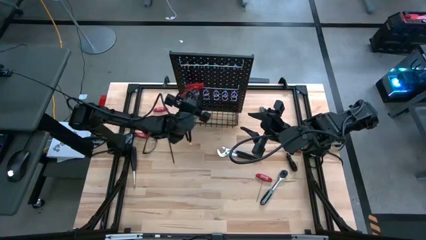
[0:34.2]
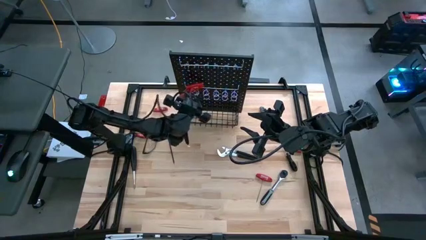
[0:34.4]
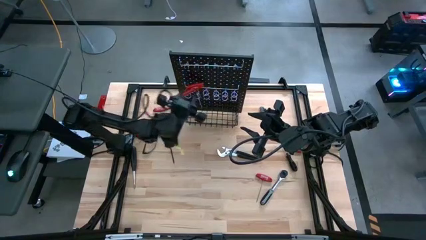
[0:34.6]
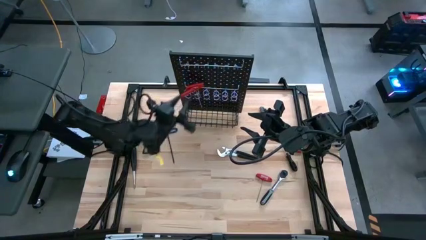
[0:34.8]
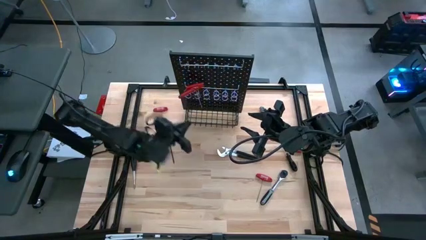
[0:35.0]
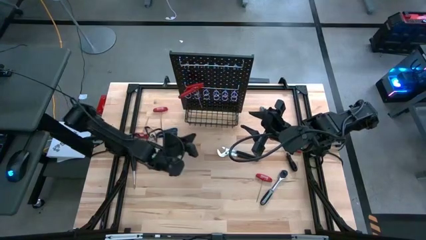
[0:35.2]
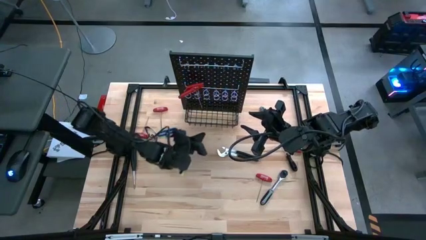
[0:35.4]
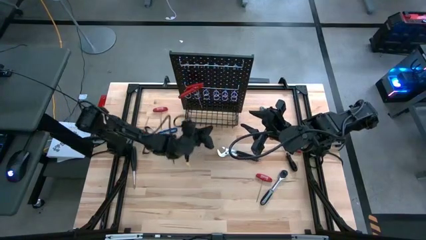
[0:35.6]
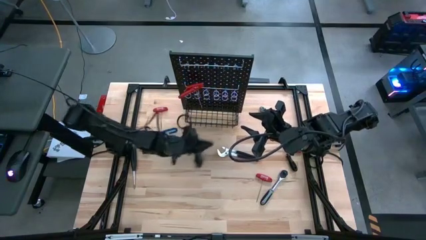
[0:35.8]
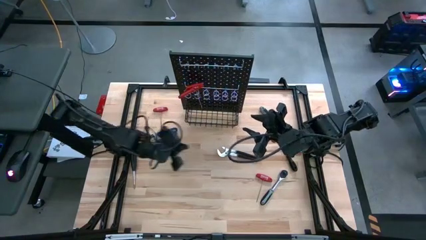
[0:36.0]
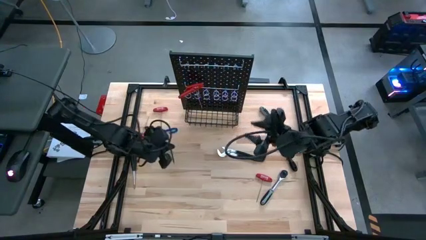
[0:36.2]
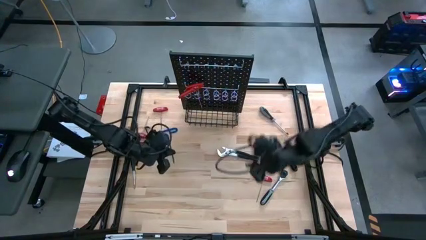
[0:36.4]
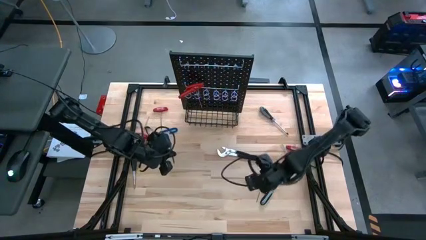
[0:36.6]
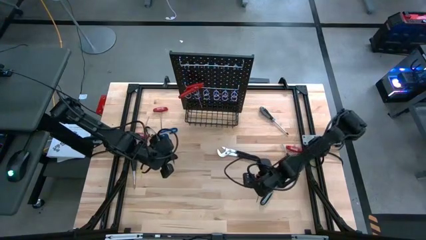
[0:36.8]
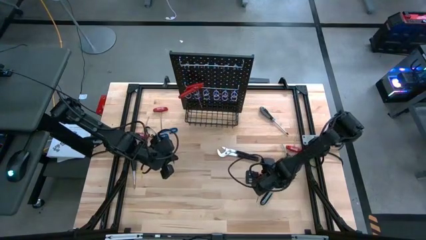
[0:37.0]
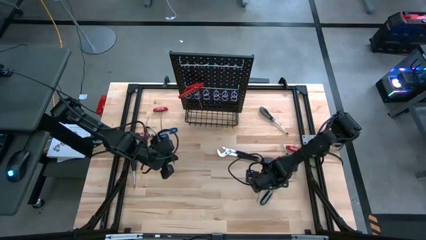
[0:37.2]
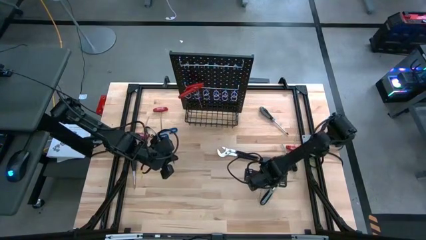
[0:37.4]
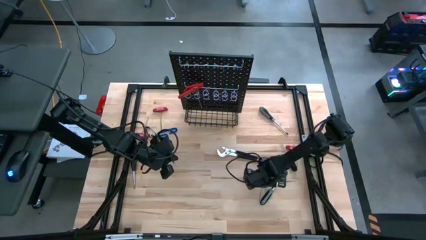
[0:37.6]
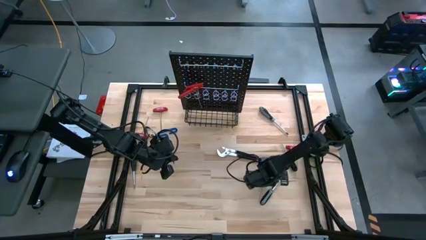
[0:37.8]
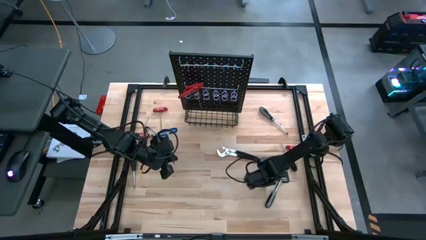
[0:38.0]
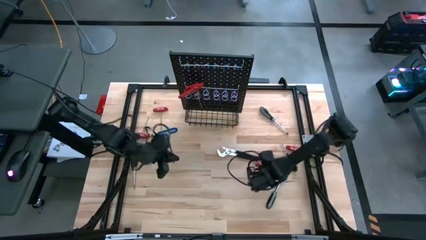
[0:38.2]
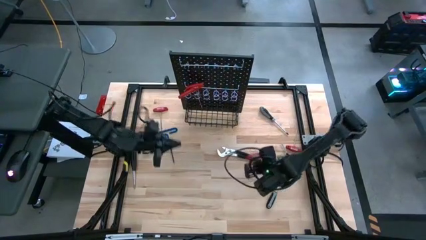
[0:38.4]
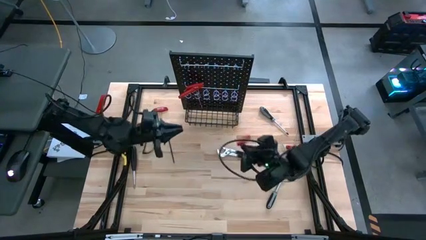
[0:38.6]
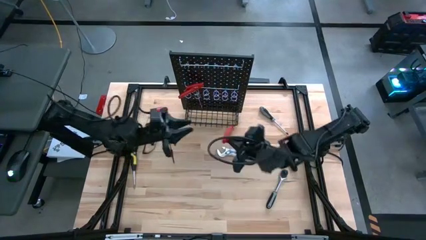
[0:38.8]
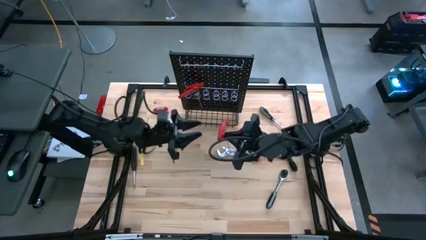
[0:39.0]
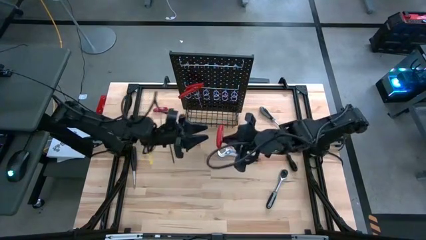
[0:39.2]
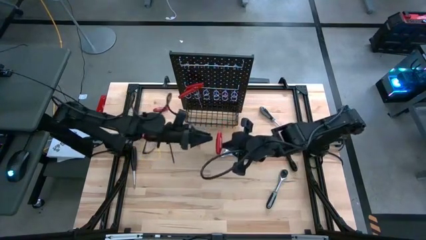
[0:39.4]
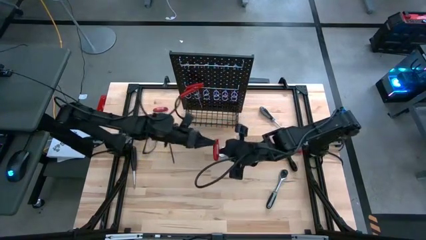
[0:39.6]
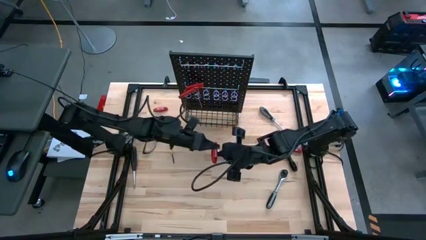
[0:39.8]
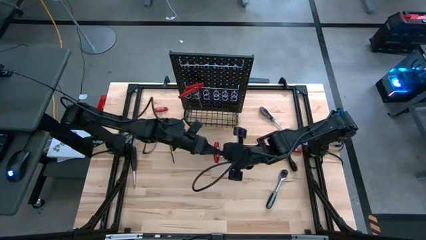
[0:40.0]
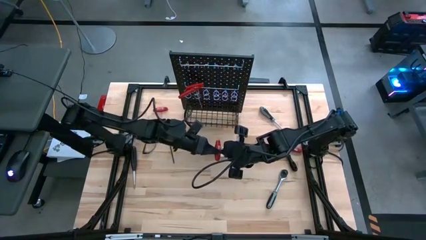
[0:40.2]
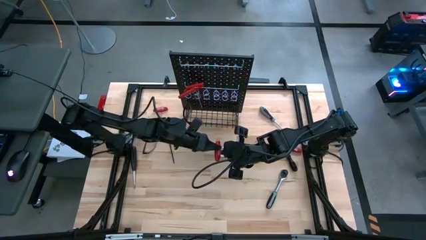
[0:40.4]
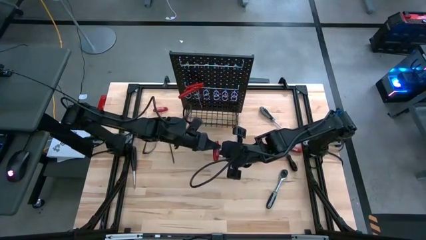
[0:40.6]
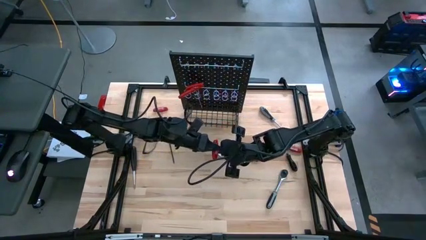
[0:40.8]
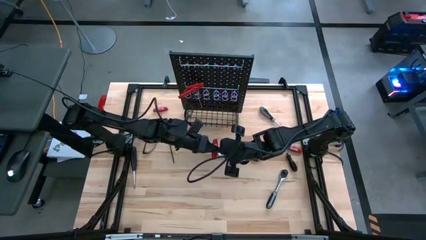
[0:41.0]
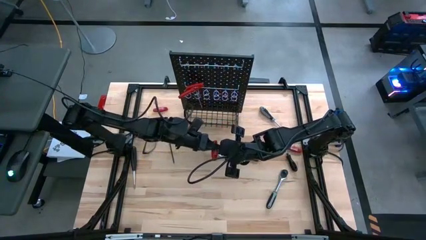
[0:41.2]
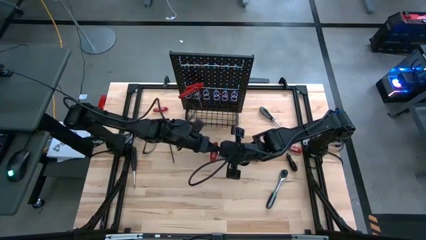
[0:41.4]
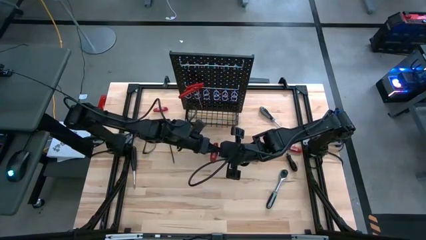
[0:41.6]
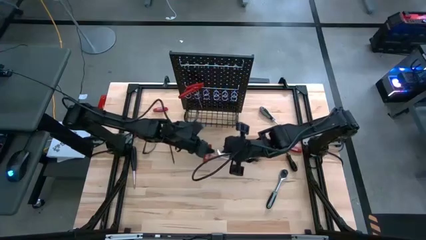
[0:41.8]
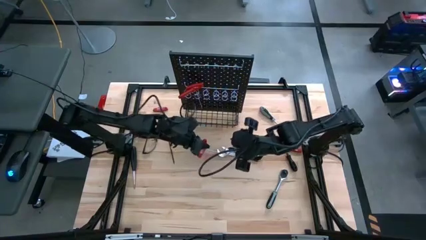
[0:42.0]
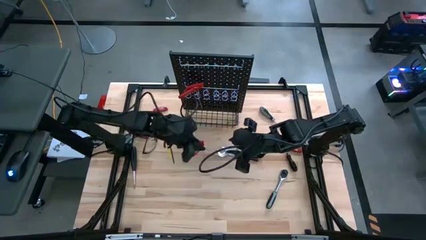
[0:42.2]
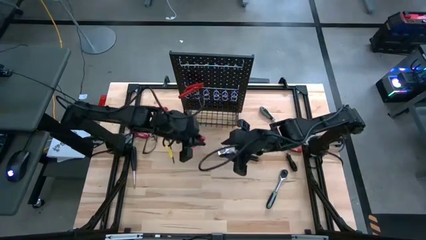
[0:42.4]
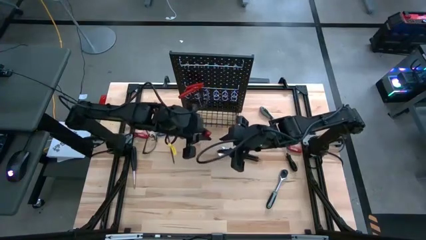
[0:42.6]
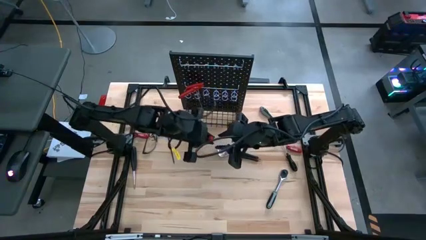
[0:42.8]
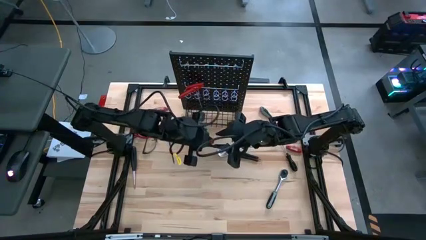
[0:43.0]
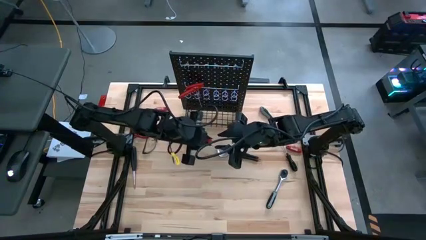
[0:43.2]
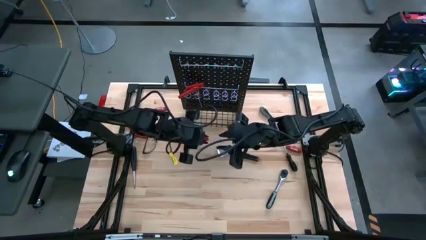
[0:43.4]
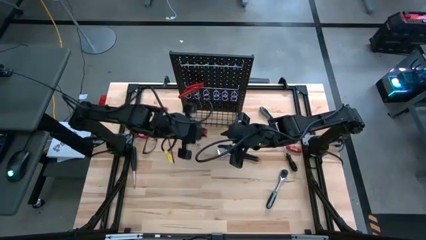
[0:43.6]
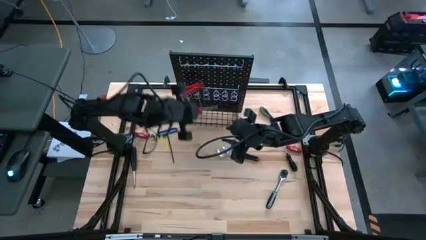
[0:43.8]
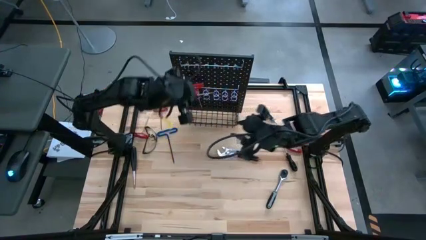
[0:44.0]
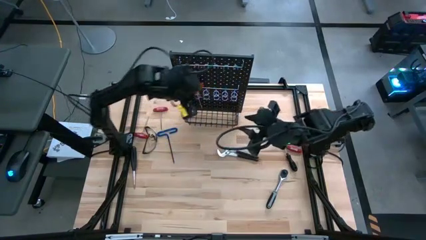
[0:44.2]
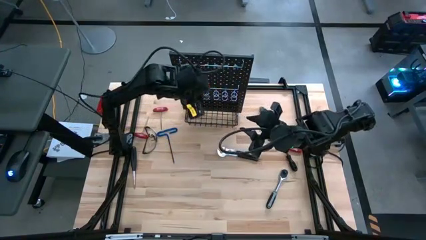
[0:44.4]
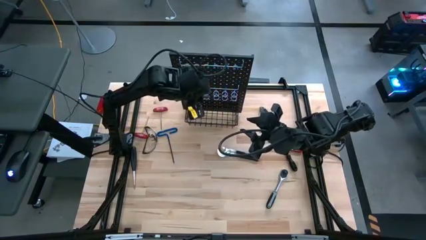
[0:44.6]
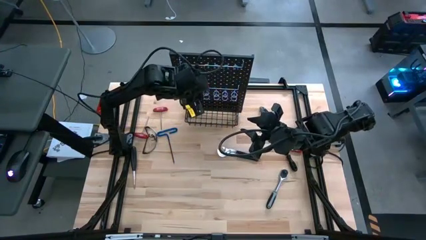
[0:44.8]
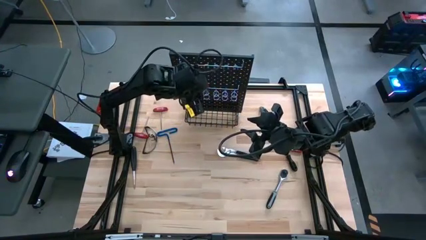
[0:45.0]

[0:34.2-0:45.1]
Task: Hang tools onto peg board
Hang the bottom red allen wrench on the peg board

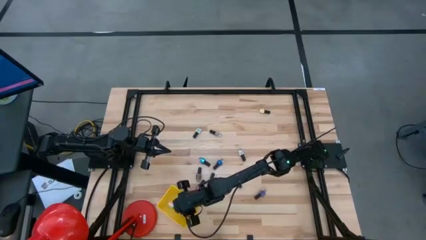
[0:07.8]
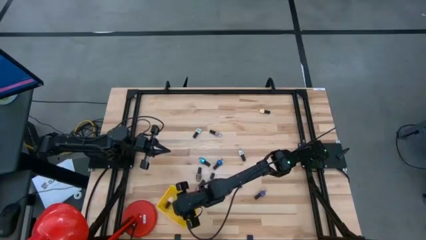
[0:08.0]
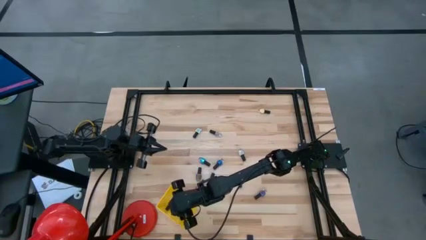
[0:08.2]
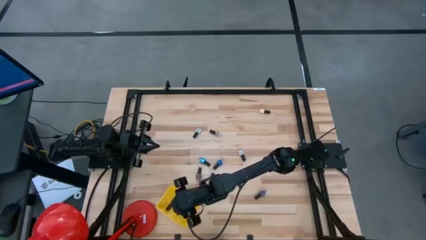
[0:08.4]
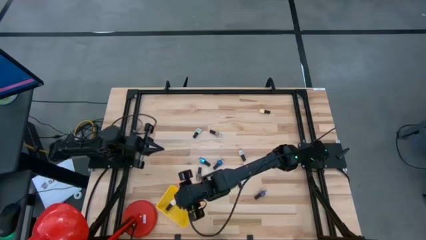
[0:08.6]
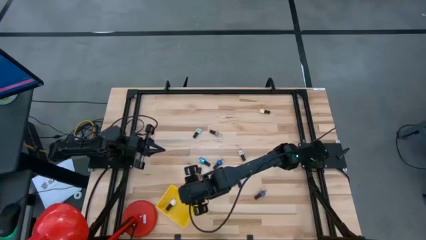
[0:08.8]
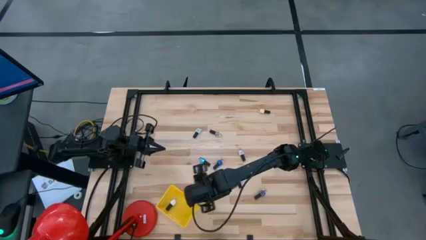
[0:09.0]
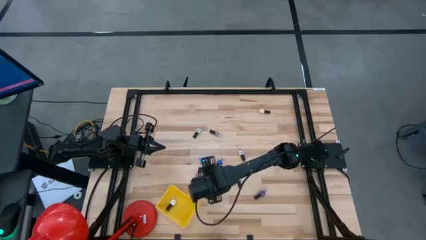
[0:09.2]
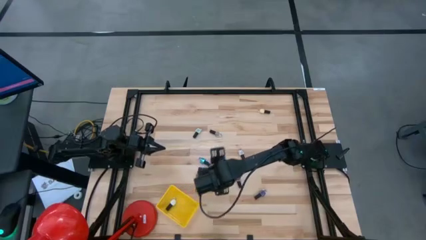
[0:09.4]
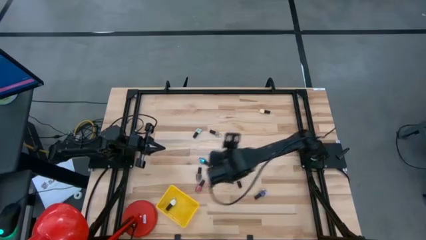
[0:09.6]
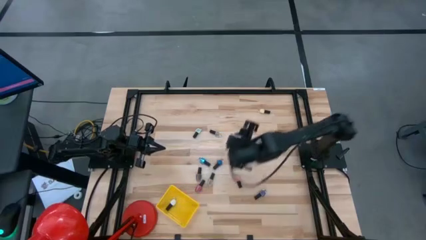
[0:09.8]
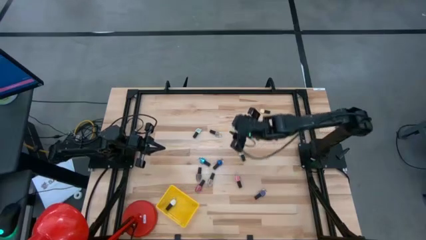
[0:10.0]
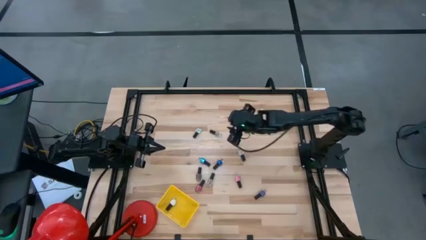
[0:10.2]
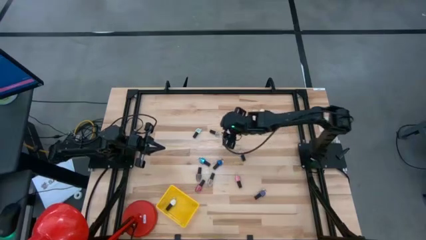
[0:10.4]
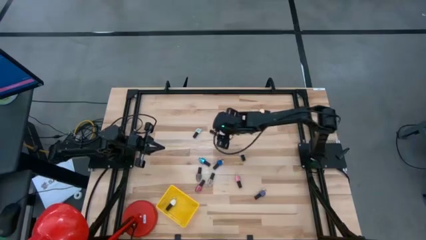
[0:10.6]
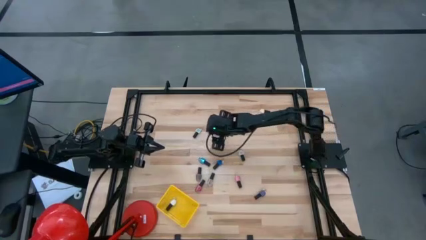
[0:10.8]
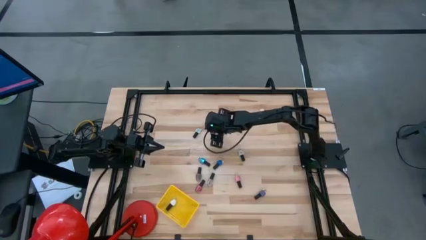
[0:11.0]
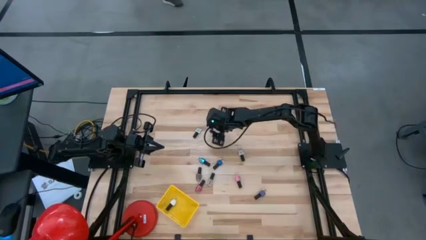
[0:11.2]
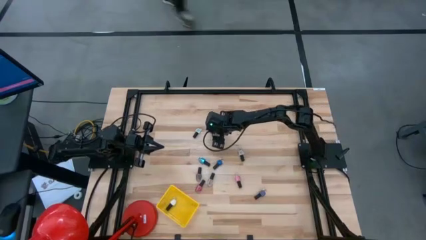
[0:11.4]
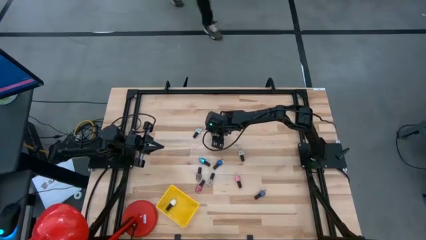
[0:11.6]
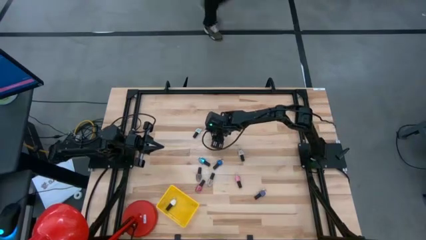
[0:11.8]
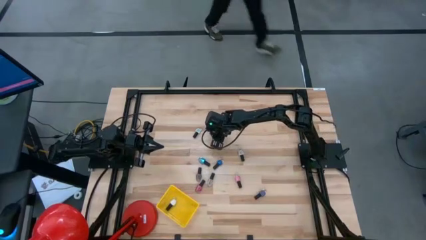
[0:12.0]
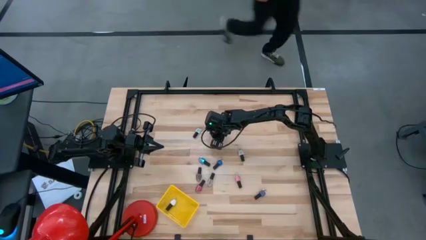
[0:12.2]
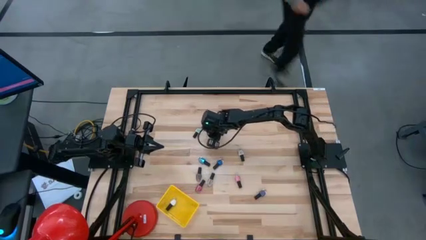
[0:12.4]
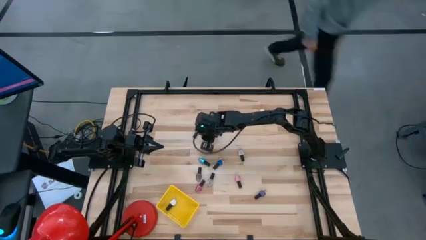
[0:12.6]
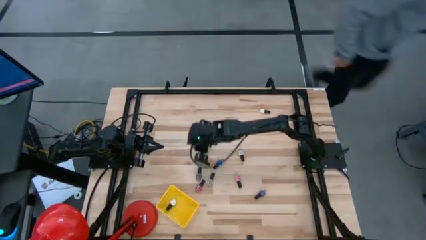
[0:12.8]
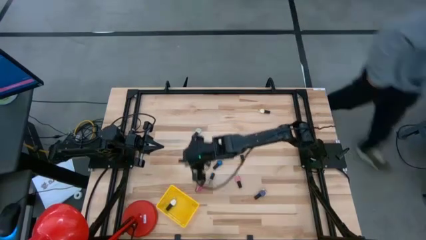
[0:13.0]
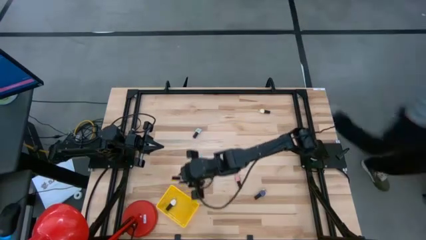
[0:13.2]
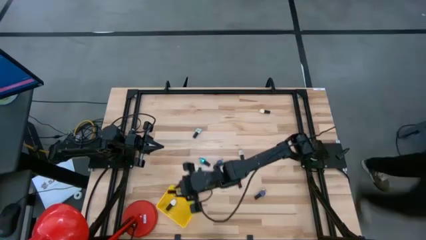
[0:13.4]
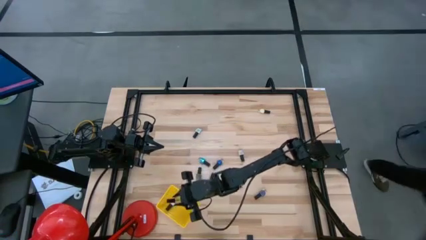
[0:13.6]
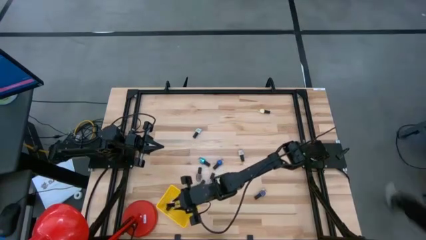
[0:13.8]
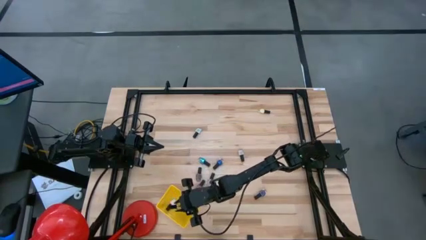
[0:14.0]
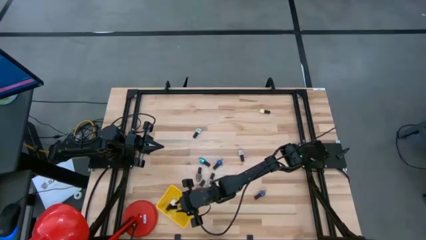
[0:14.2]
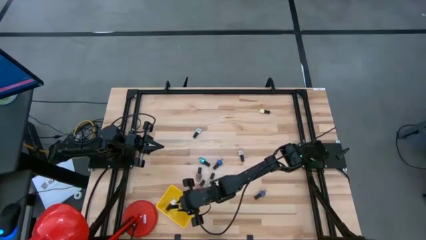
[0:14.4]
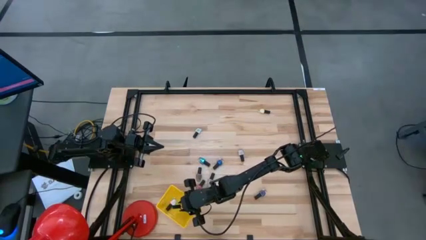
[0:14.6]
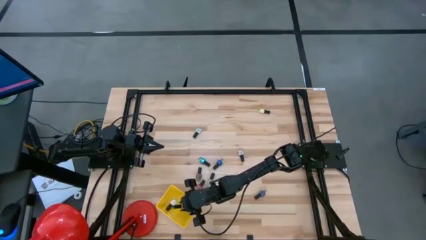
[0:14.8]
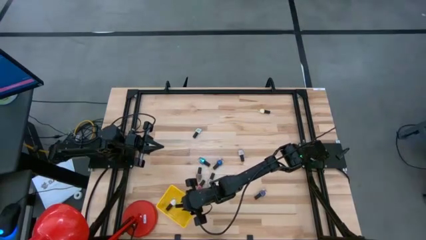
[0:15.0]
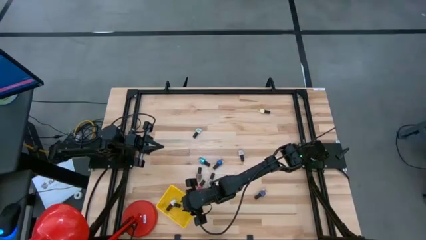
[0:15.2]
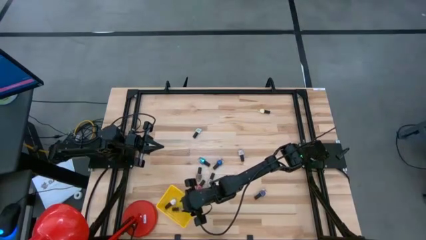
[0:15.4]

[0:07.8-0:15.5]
Task: Pick & Place Nail Polish
Put the top transparent nail polish into the yellow basket
